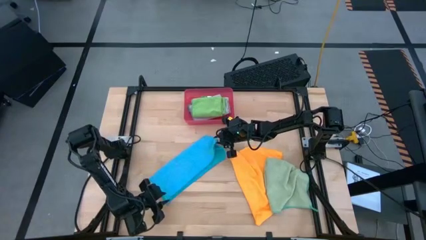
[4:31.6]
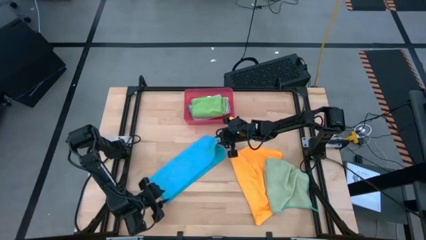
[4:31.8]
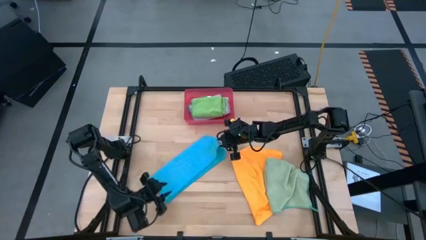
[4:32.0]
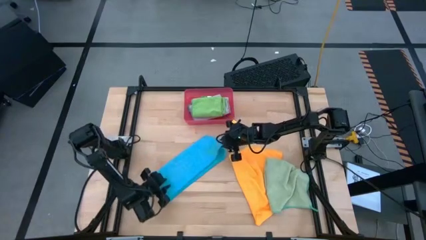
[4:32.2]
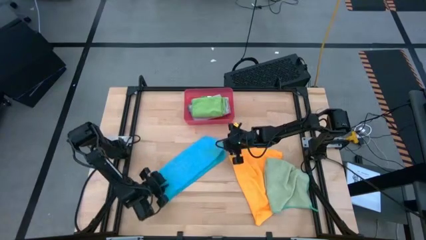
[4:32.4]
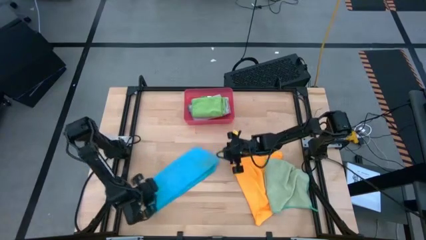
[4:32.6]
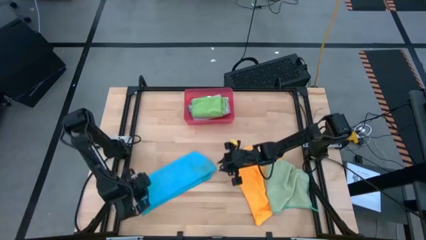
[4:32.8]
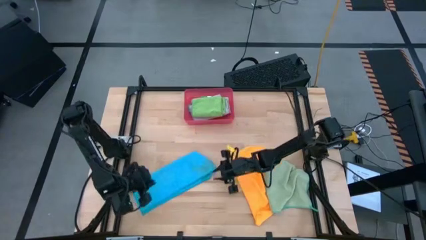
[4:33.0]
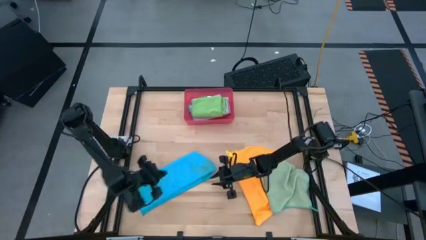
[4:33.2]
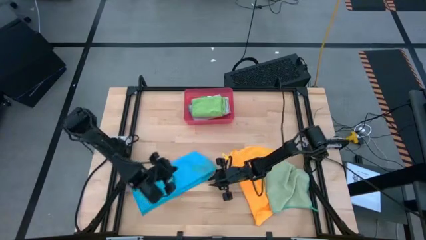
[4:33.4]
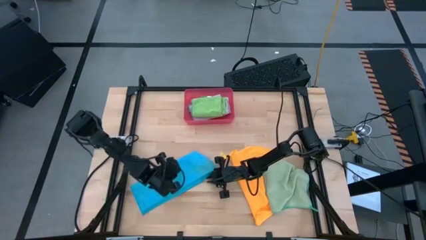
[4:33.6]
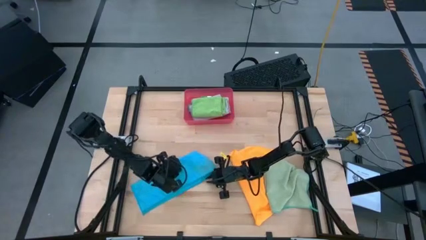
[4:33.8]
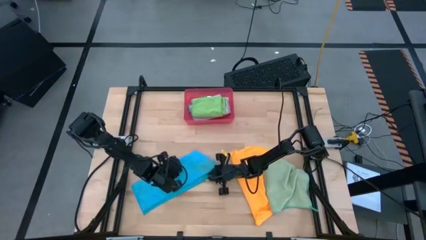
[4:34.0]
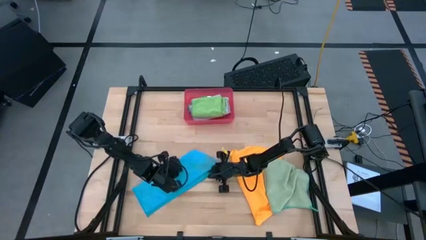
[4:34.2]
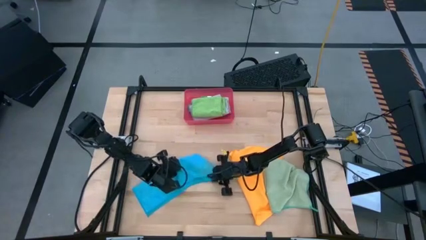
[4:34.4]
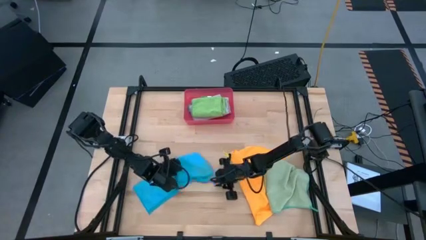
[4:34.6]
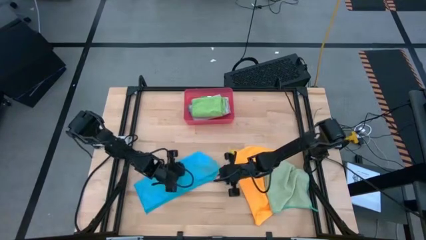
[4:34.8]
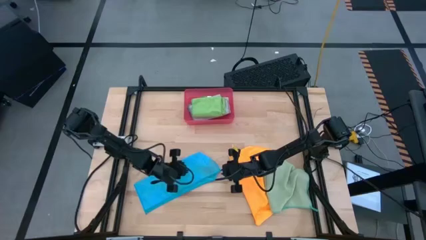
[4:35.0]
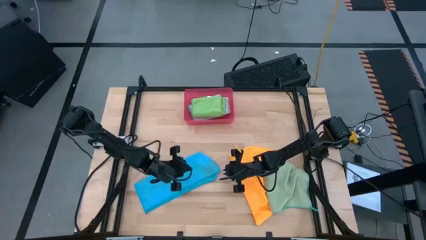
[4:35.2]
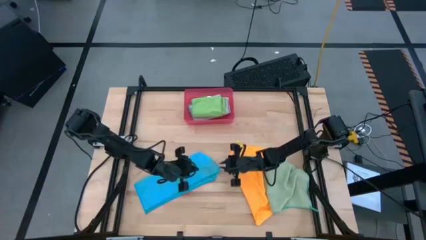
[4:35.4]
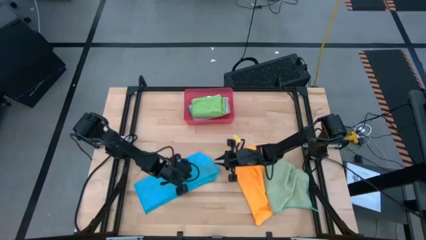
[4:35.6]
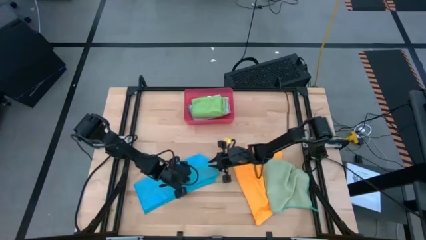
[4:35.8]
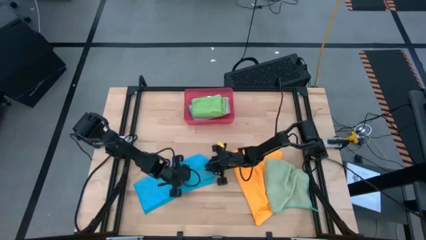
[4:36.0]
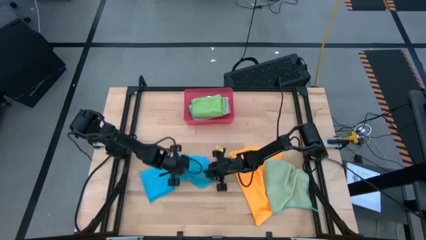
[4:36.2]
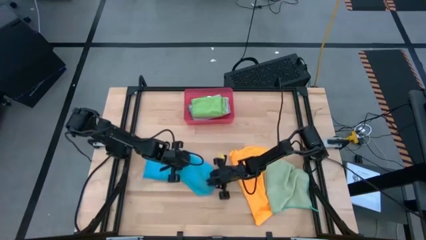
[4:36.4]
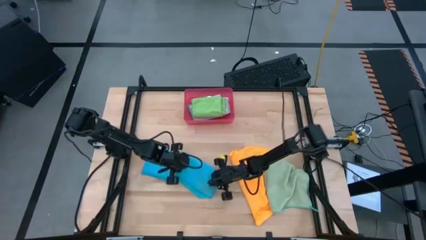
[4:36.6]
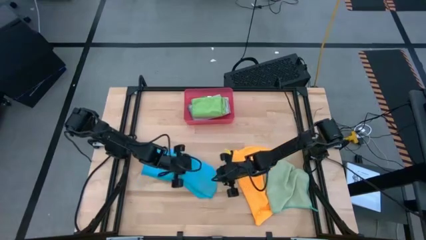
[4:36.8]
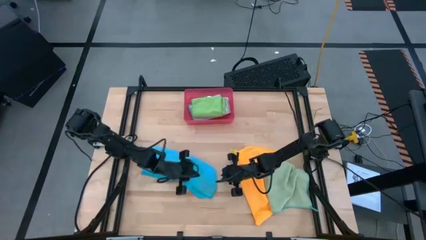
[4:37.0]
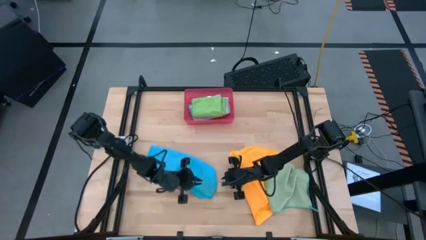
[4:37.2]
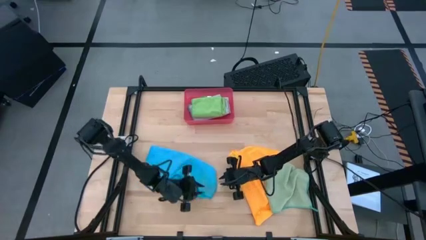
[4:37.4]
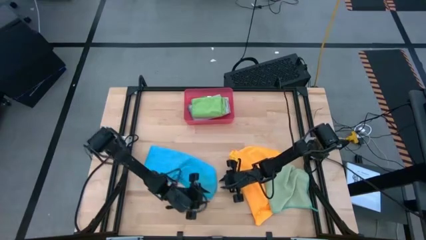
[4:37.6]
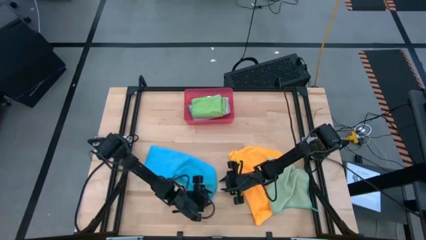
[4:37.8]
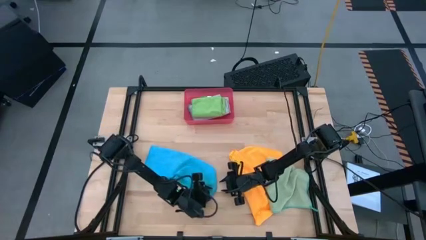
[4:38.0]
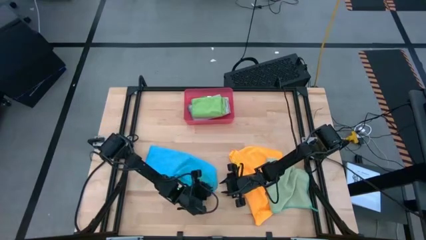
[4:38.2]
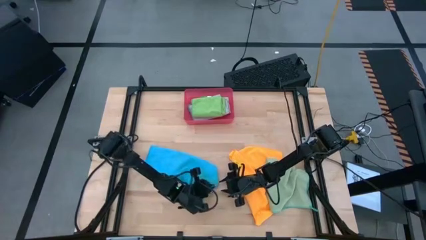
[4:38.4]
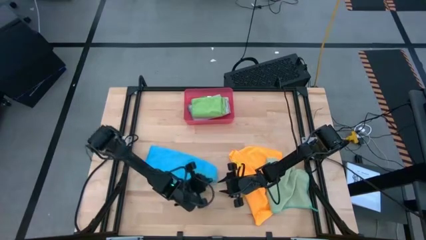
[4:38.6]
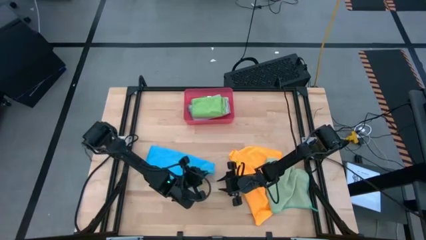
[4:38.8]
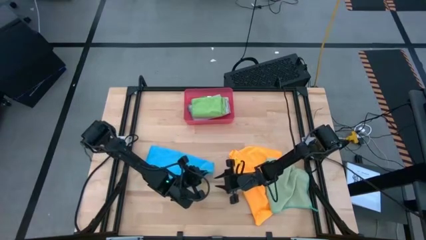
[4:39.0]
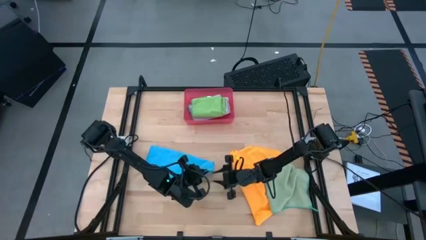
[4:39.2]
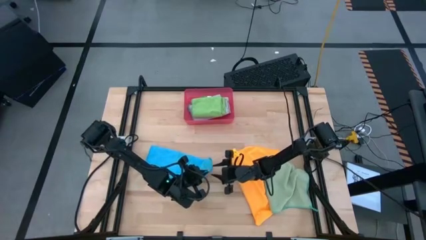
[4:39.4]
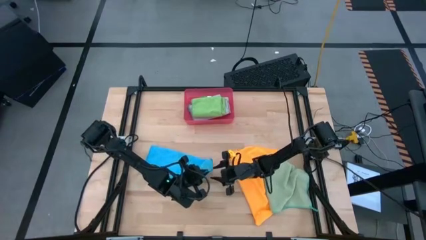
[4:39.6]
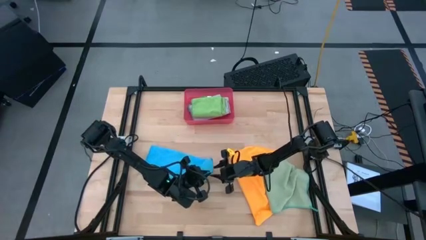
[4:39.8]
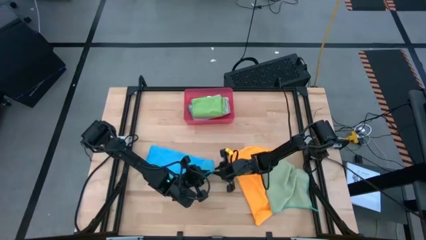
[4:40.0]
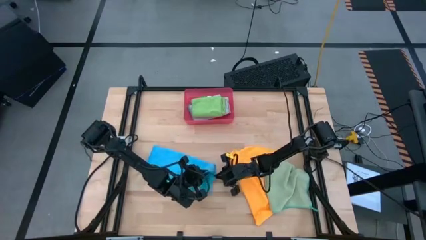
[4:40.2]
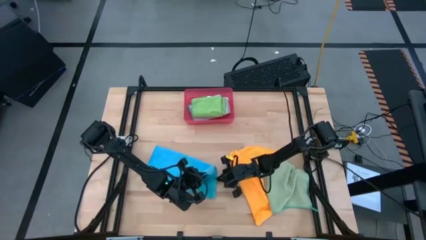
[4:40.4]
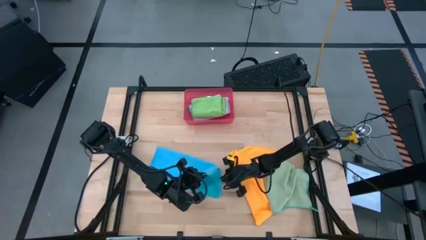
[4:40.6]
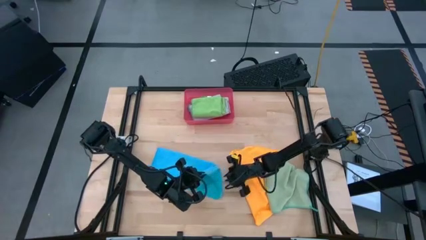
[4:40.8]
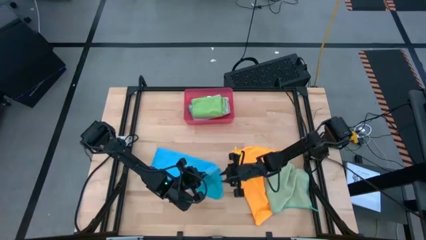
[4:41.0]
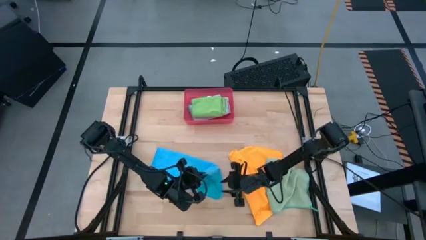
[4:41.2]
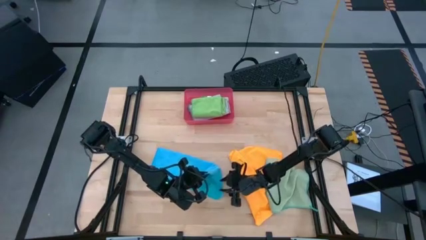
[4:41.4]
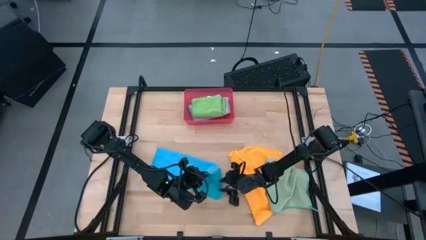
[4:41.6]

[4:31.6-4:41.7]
Task: Fold microfiber towels
Fold the blue towel

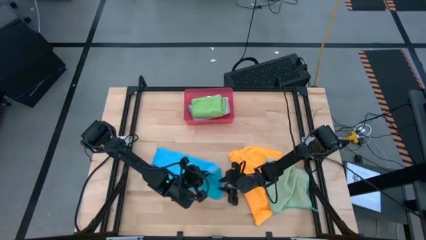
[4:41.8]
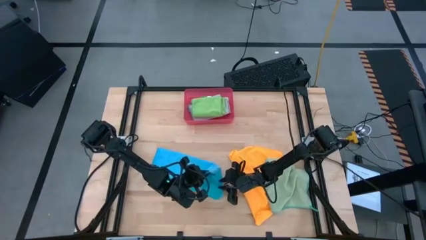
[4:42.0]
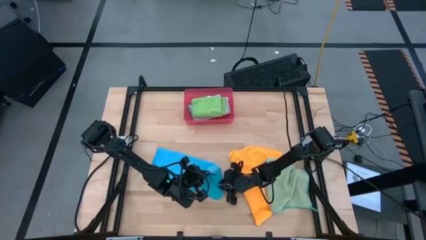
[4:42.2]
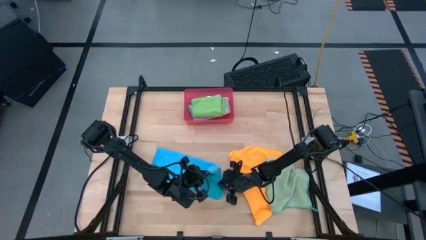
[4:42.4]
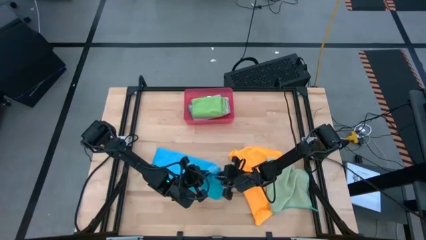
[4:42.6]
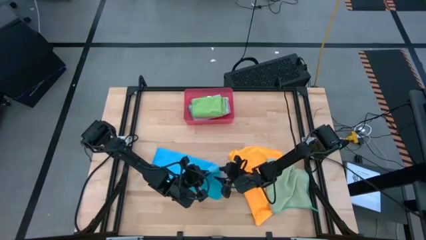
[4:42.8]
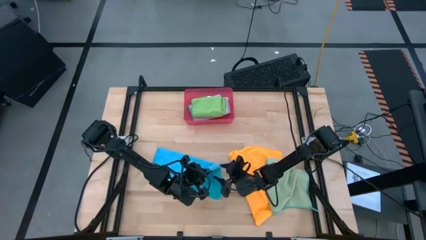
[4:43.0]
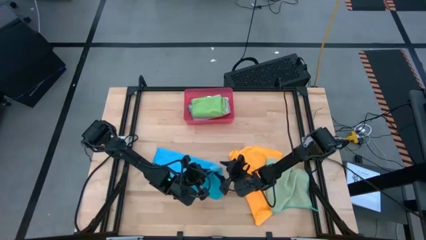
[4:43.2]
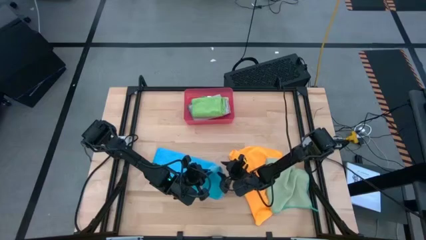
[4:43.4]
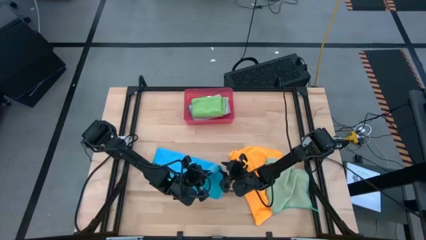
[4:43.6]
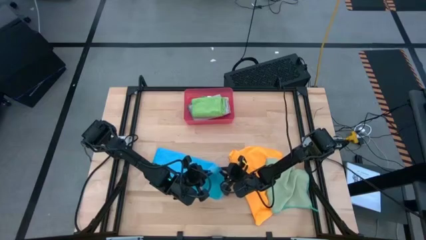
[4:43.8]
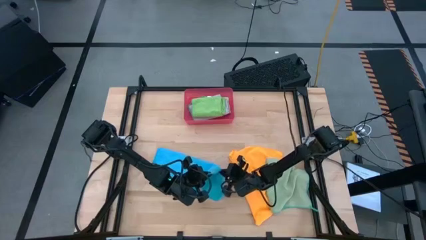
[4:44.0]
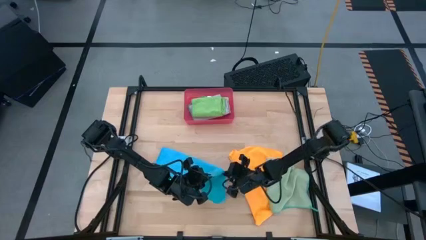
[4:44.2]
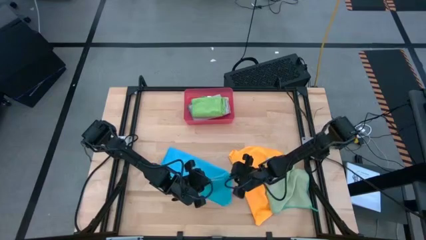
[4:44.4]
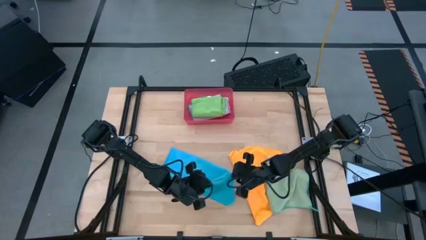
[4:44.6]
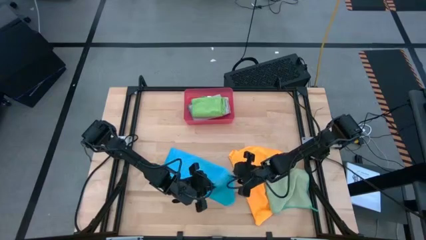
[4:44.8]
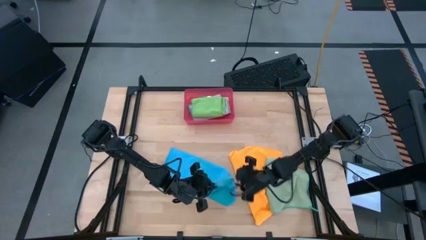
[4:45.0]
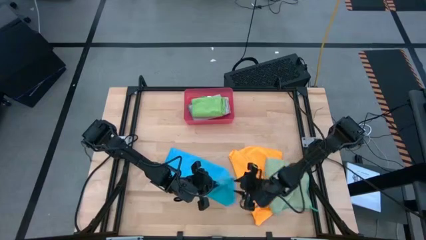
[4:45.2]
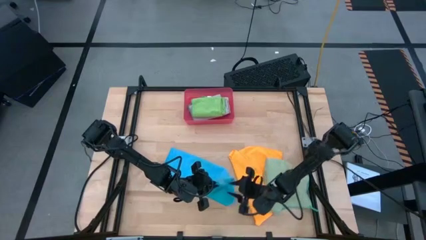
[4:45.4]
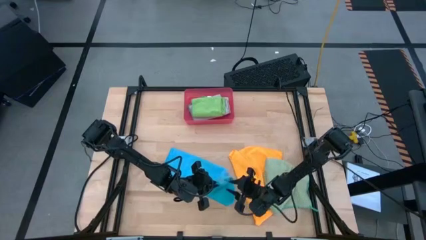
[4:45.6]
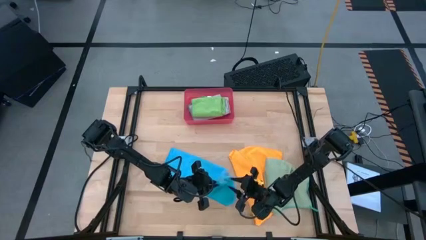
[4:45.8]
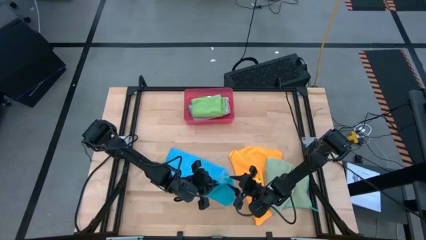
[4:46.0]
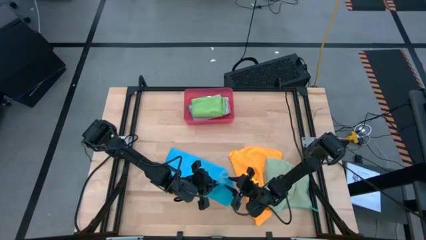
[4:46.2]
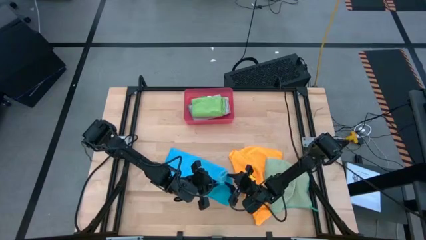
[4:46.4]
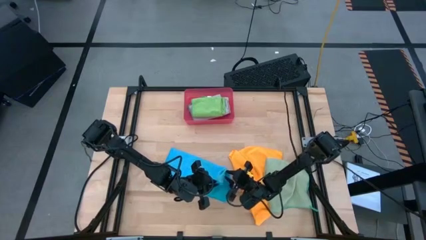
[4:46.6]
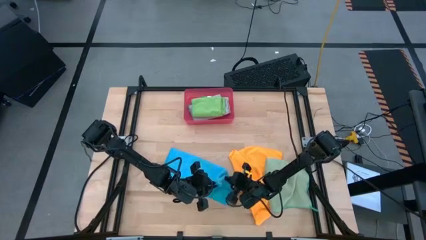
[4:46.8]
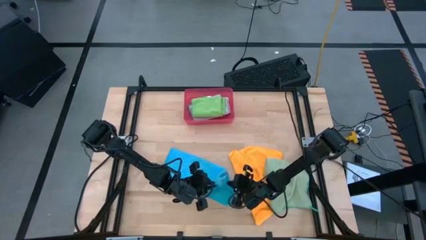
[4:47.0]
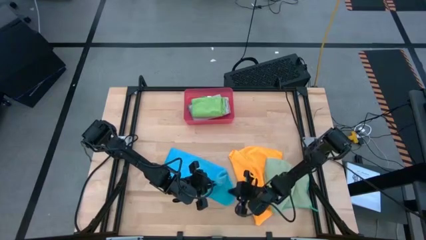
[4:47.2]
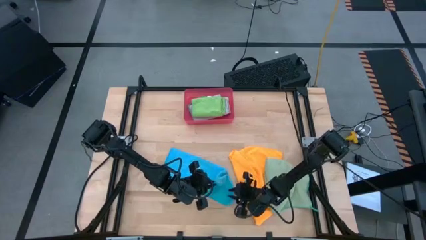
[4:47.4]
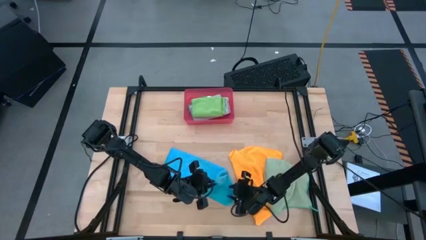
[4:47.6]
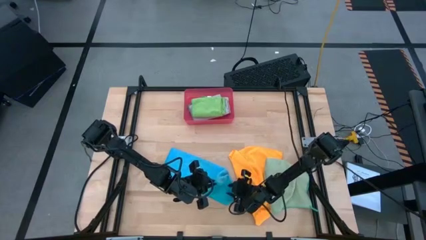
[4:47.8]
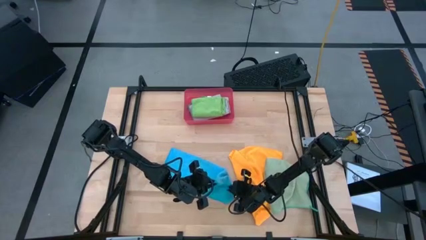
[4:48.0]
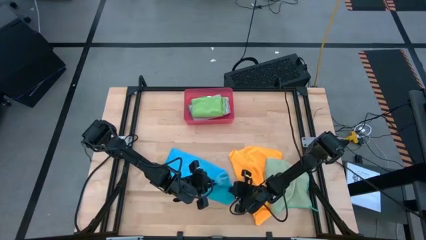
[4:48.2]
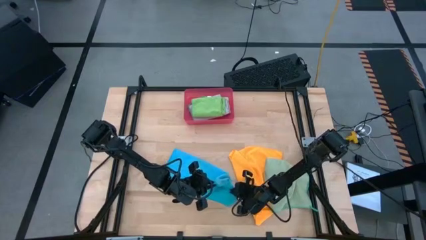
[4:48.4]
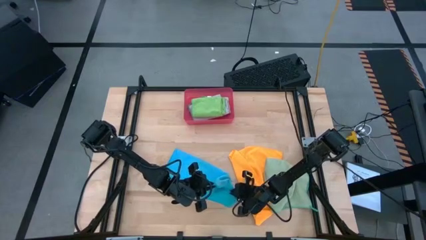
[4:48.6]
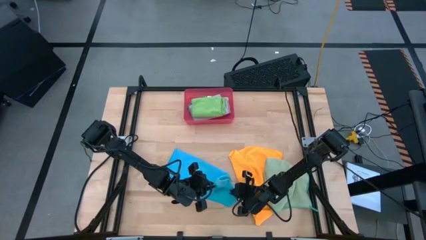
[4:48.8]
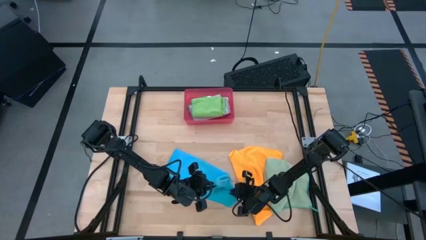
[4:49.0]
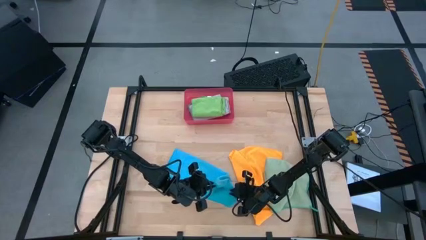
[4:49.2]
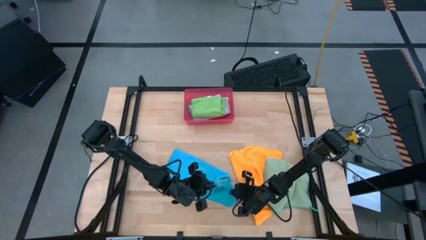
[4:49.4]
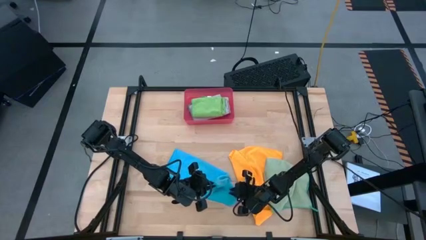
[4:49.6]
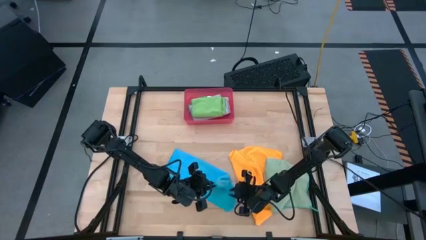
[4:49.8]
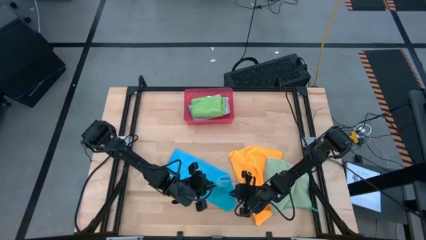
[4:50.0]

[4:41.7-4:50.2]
Fold the blue towel
